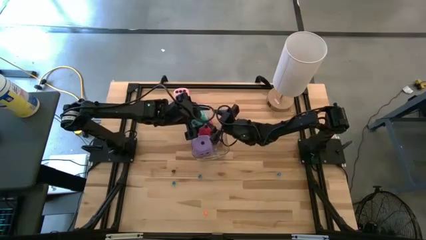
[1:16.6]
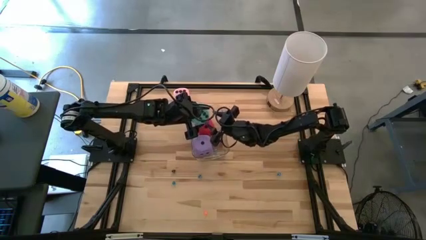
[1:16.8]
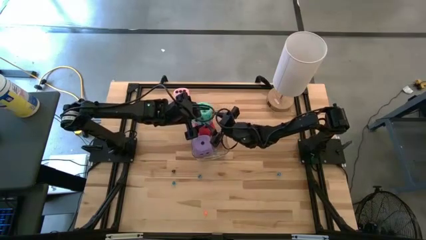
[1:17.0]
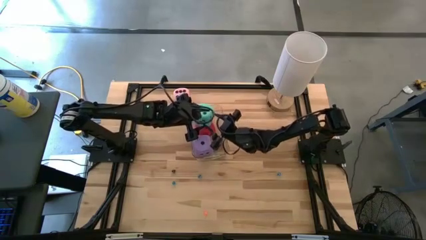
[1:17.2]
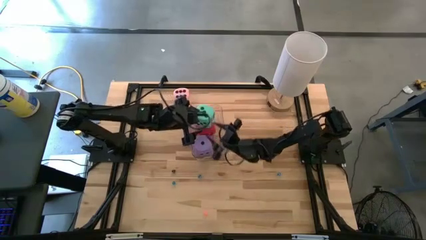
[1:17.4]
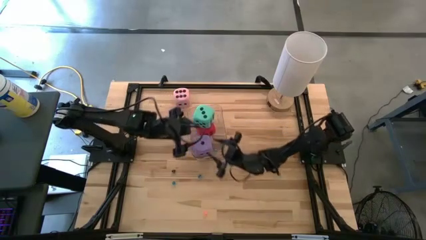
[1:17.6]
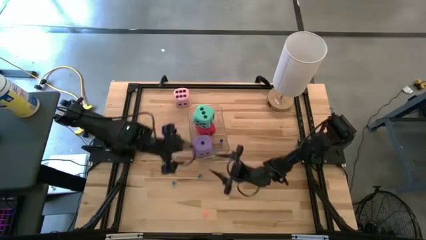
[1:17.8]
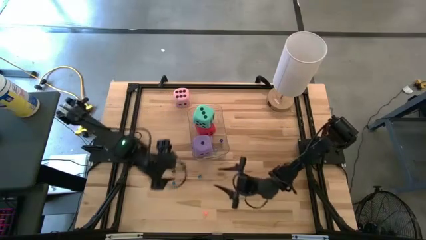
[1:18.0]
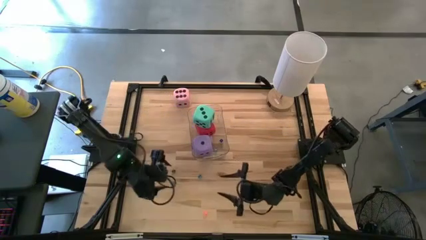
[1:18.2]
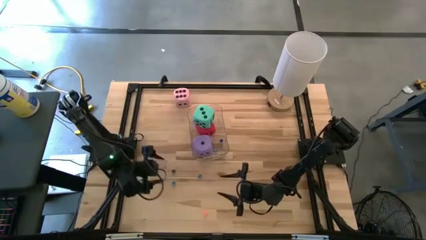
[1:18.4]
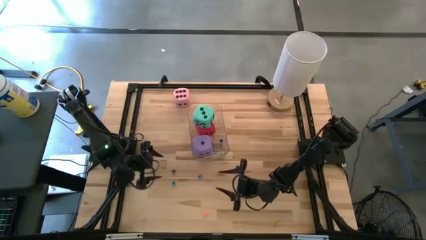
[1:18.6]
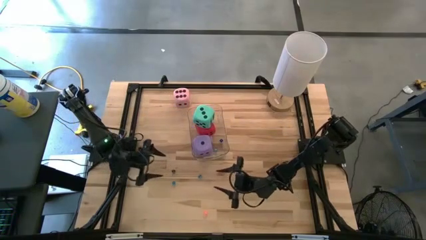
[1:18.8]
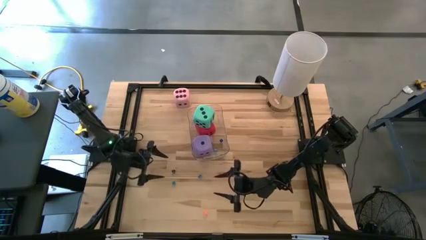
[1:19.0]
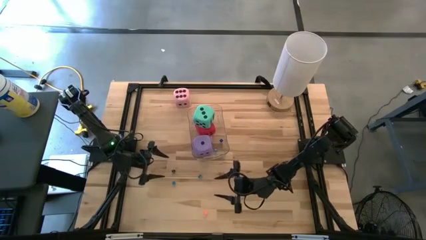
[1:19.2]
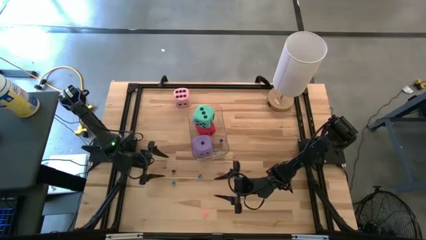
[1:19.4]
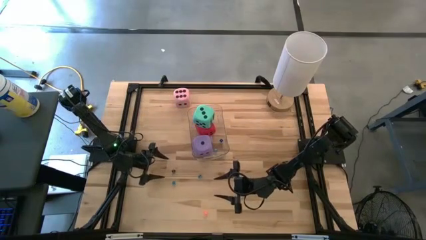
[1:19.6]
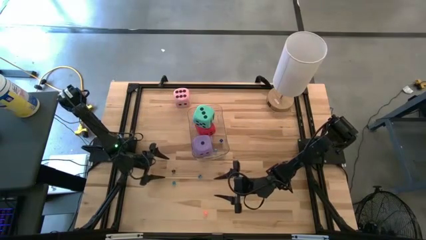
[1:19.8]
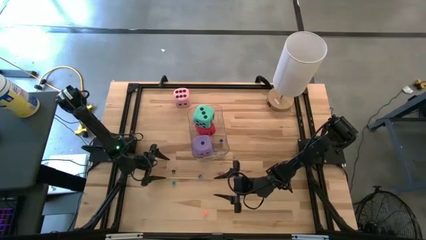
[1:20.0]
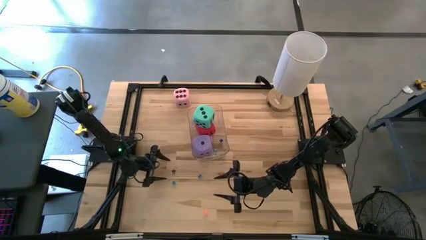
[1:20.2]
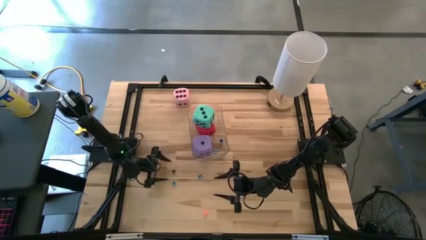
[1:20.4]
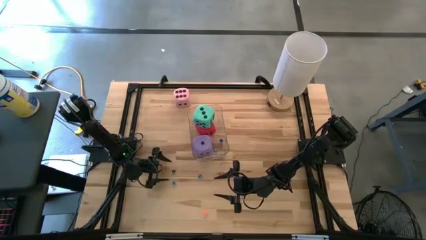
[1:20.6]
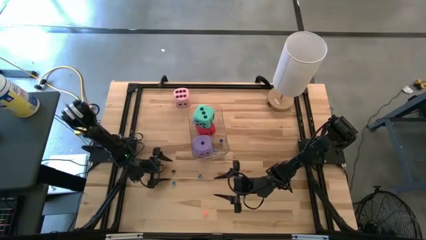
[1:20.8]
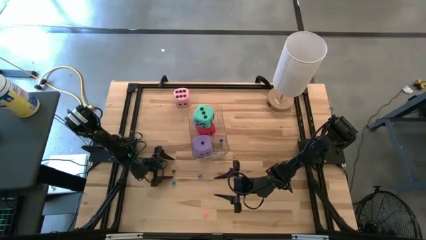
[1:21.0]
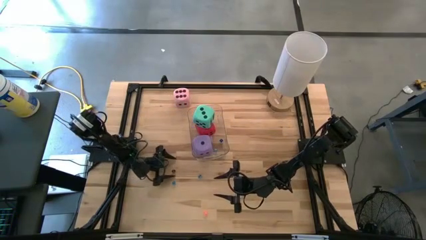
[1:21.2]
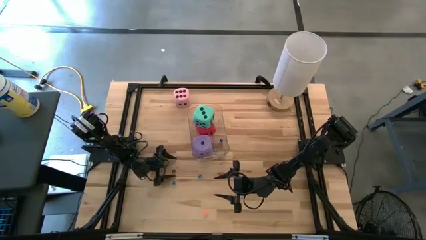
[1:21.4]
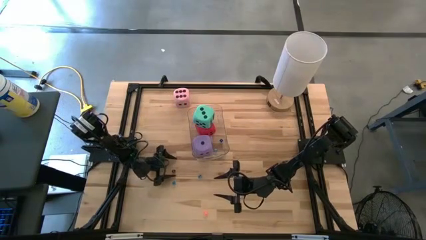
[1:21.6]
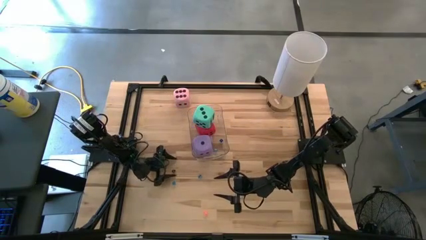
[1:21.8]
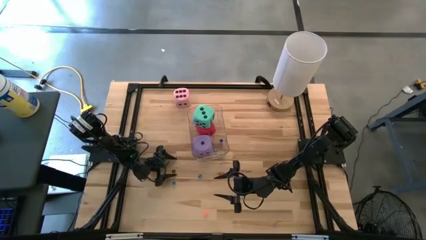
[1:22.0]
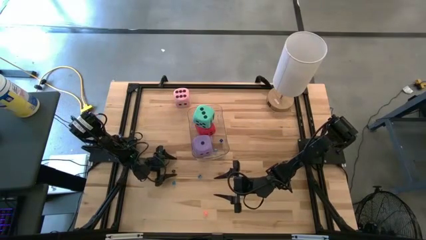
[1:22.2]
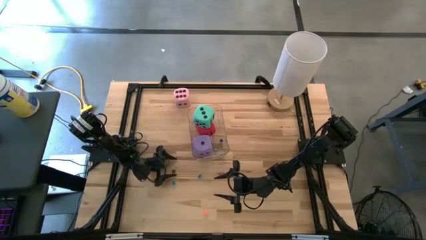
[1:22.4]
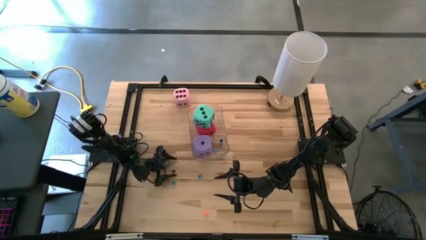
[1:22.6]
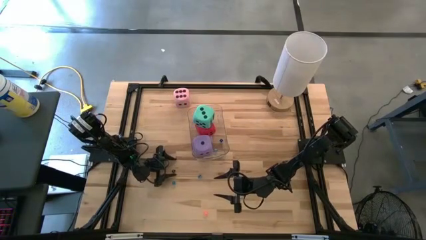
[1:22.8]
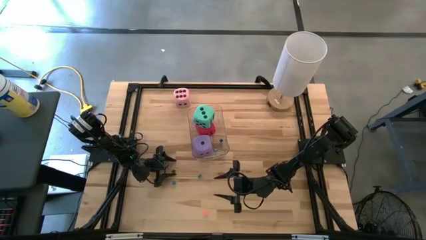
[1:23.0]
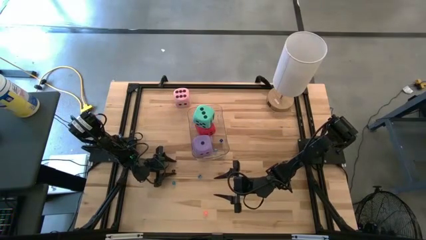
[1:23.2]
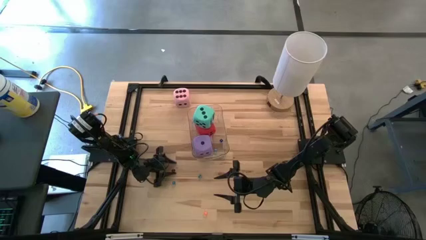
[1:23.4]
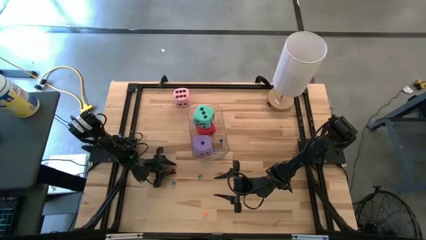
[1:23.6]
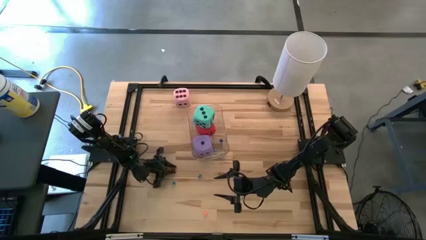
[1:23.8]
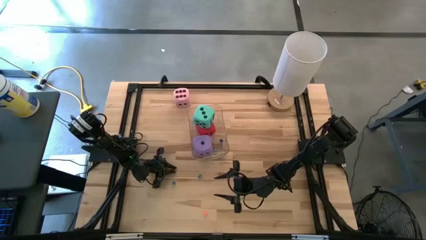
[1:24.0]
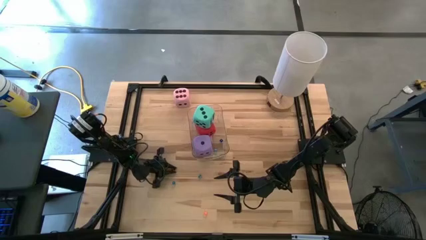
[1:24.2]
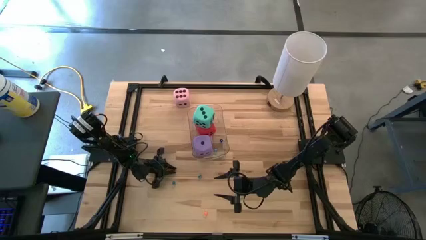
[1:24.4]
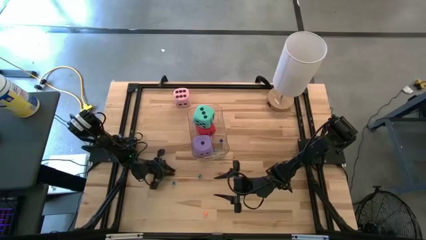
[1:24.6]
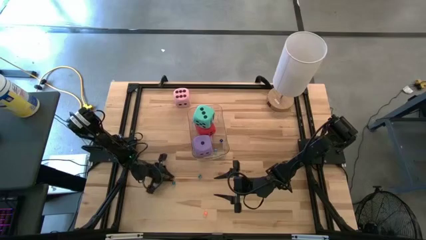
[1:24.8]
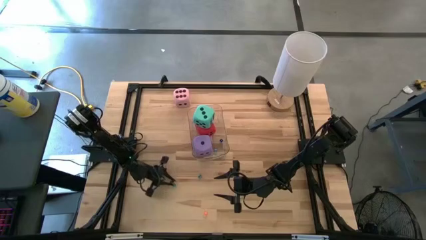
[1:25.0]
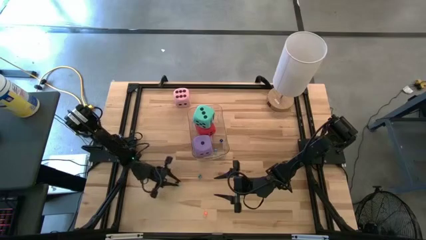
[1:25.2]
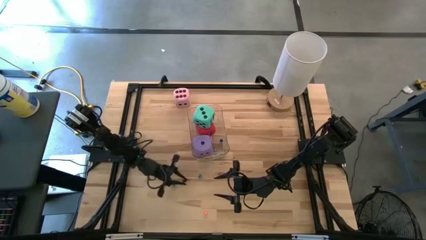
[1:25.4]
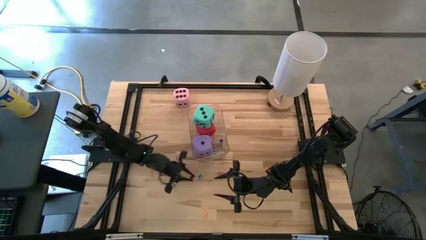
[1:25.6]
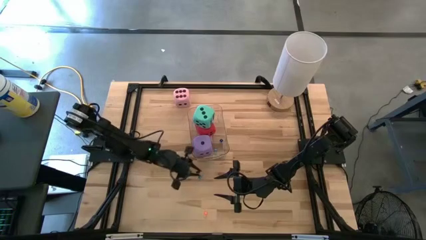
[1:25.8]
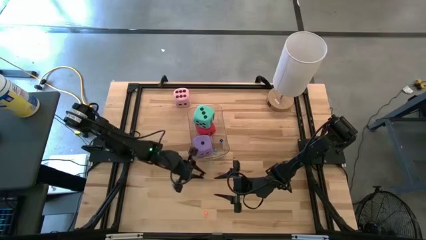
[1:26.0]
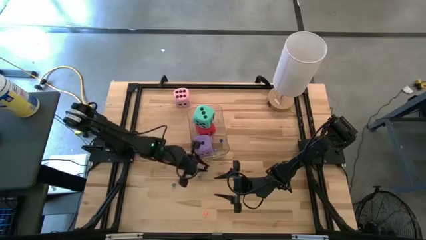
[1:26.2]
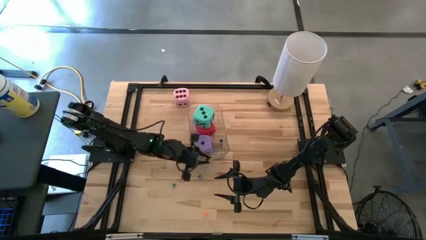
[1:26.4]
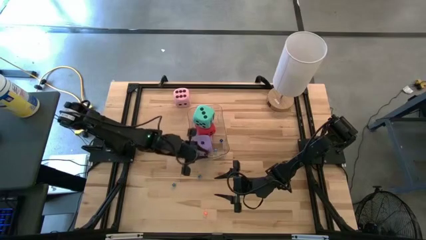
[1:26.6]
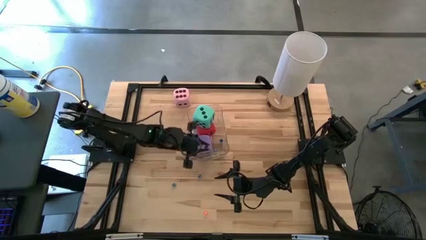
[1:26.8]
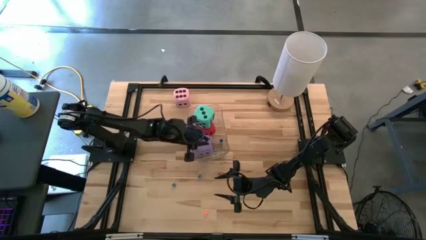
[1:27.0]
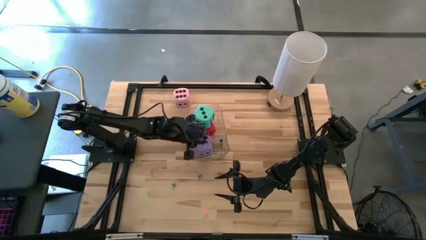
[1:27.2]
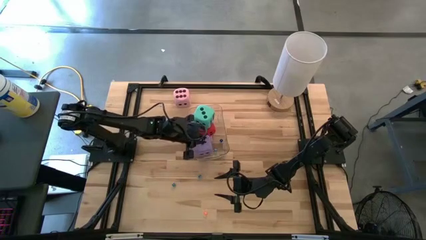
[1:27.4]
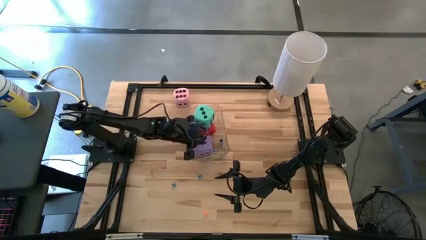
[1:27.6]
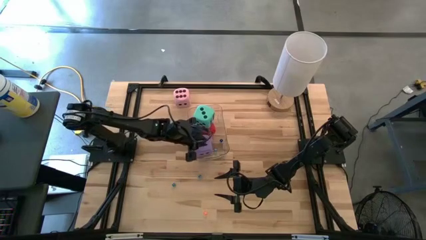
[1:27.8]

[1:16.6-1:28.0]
Task: Pick & Place Dice
Put the small black die into the transparent bin

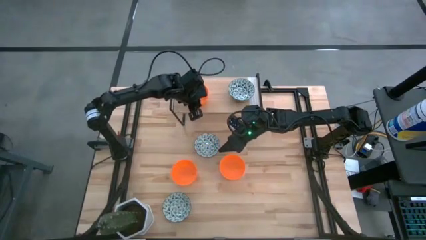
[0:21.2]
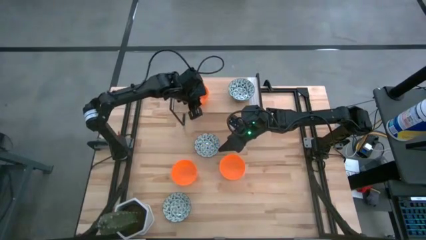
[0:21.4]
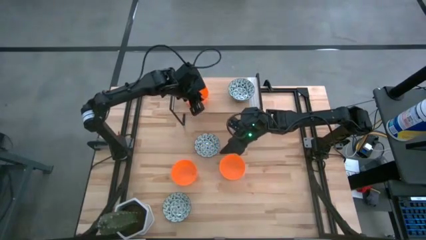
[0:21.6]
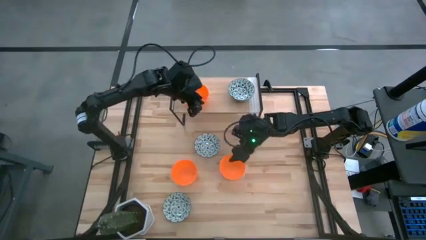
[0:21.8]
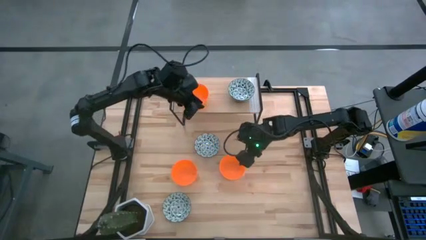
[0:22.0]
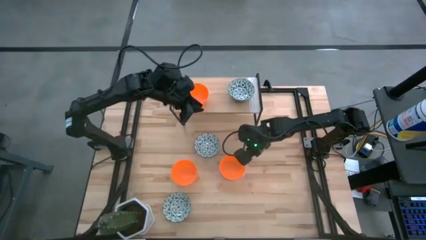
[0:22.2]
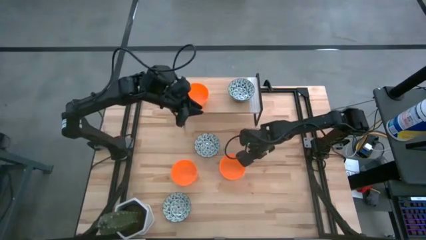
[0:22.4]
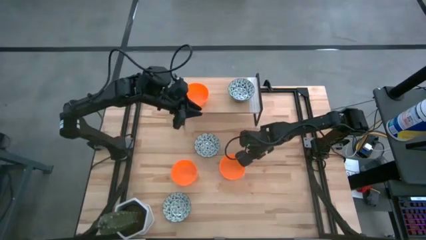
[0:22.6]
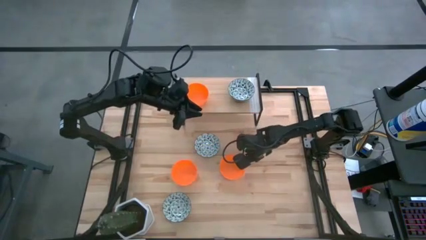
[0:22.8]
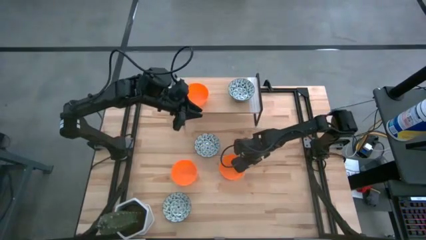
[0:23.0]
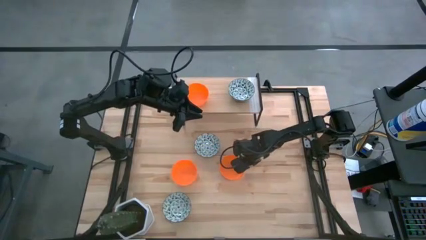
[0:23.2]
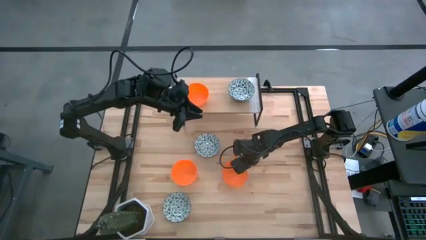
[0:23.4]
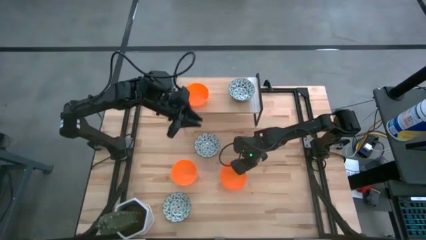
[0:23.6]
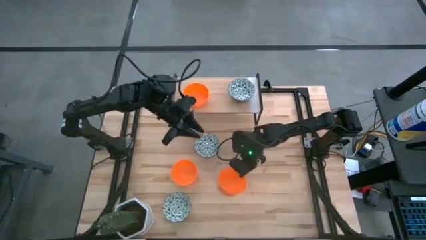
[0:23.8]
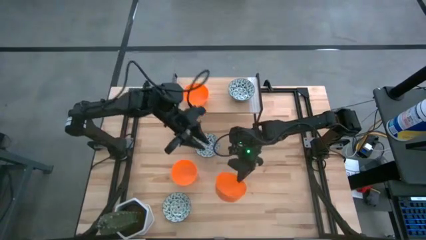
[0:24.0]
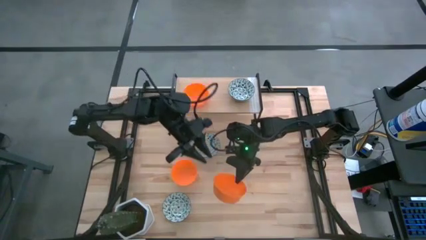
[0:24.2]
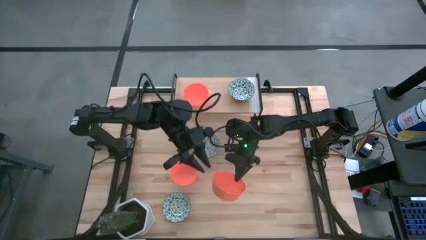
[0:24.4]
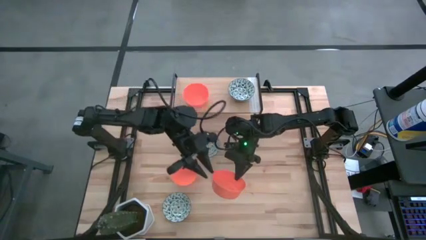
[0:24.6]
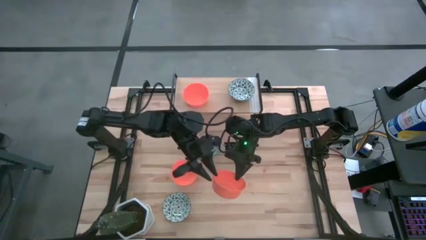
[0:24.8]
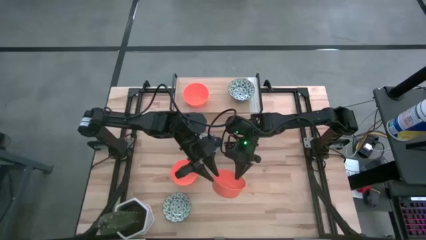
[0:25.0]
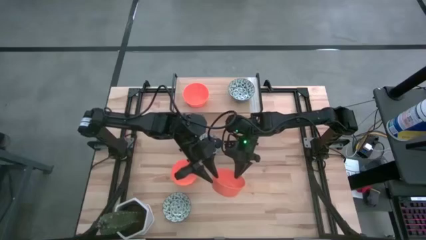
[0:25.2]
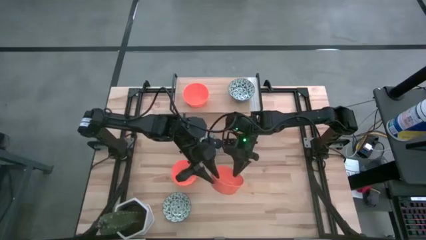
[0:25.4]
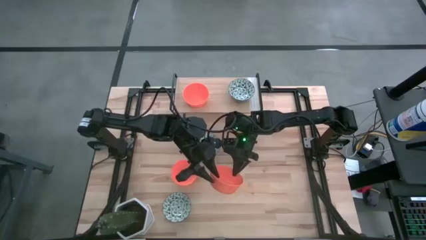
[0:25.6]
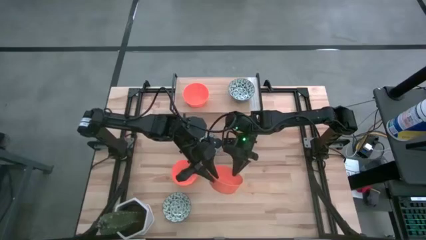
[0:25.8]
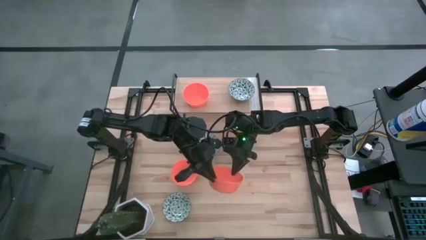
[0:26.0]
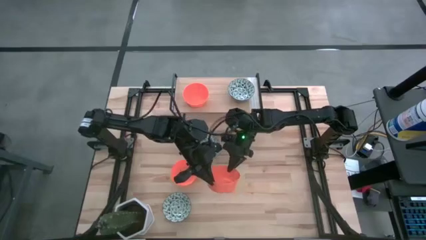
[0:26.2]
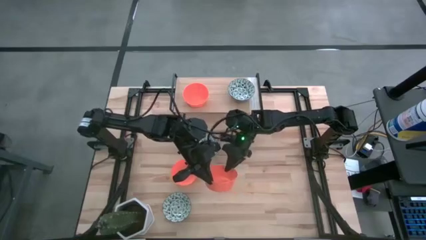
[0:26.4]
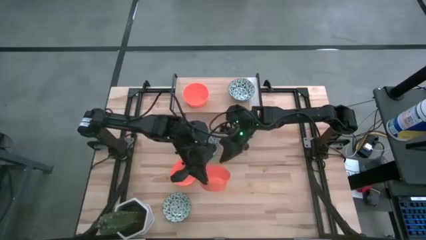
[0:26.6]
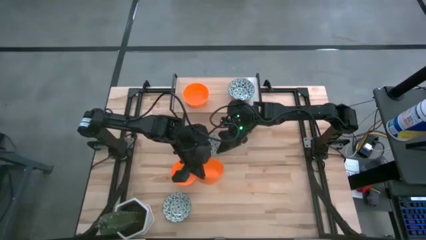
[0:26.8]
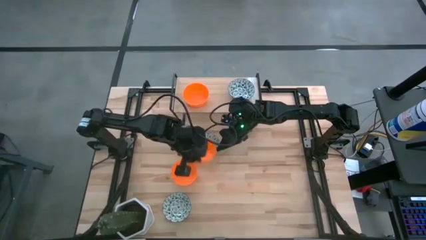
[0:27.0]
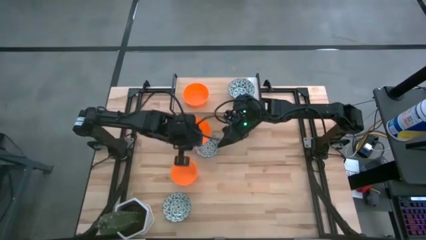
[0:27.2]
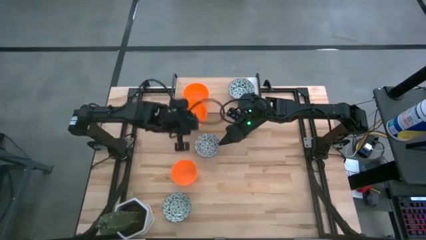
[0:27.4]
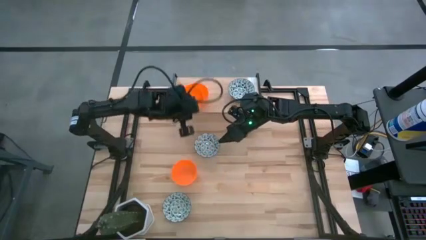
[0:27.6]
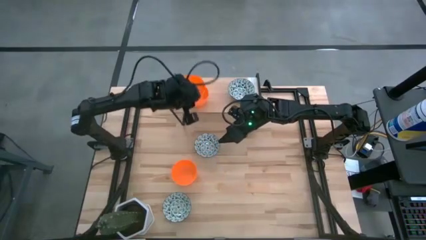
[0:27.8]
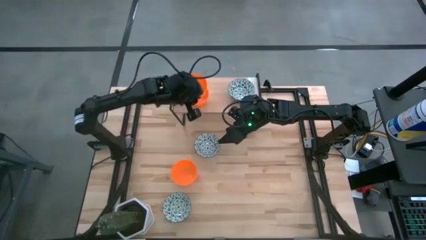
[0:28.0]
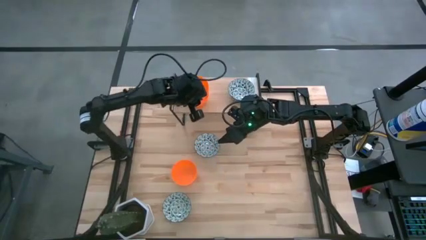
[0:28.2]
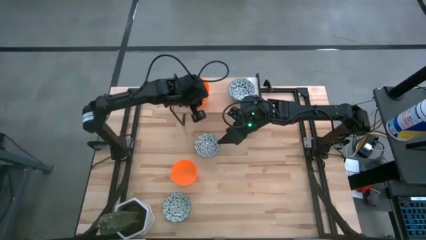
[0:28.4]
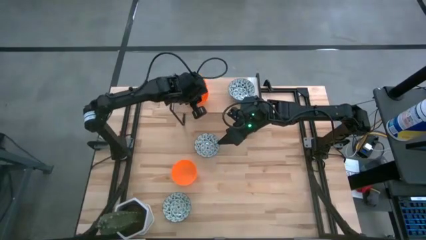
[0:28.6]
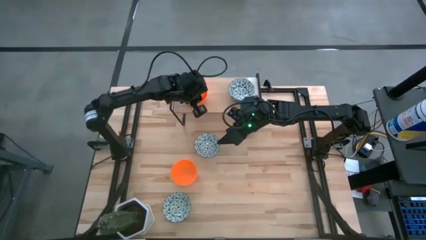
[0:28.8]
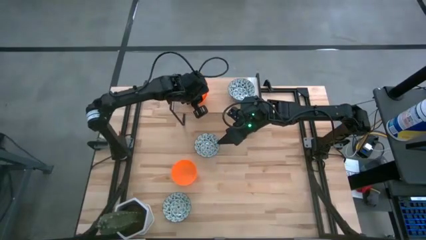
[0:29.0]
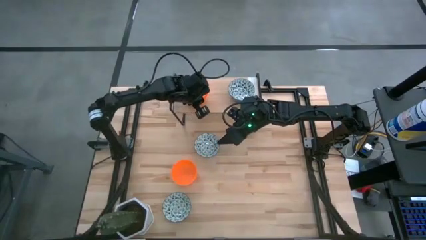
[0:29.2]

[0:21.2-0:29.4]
Task: Pick & Place Mini bowls
Stack the right orange bowl on top of the orange bowl on the shelf
